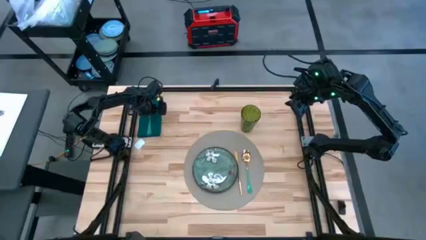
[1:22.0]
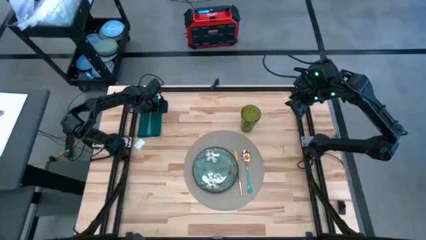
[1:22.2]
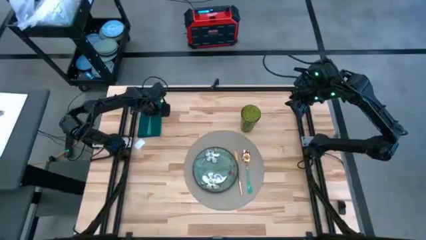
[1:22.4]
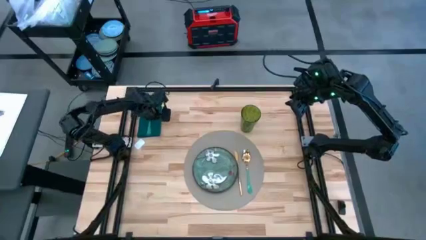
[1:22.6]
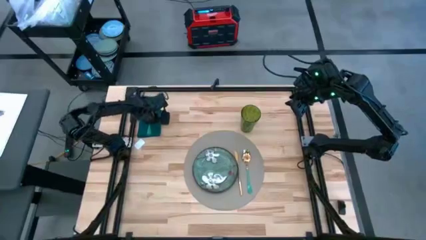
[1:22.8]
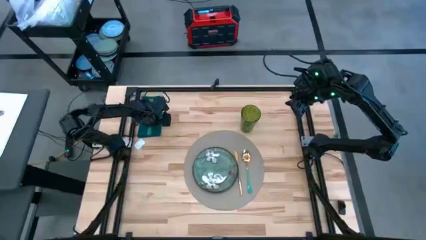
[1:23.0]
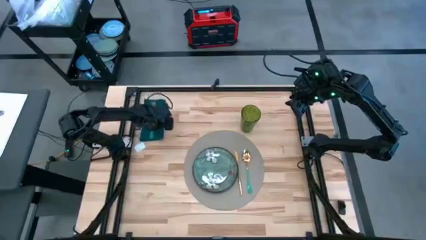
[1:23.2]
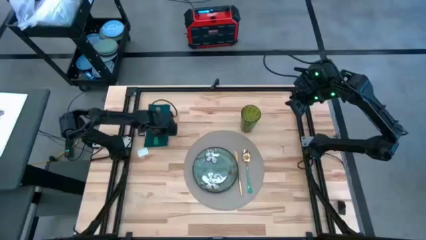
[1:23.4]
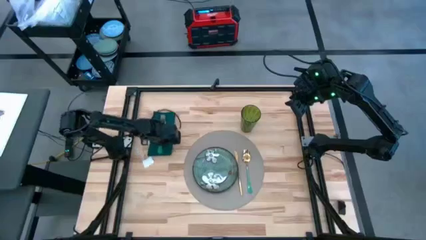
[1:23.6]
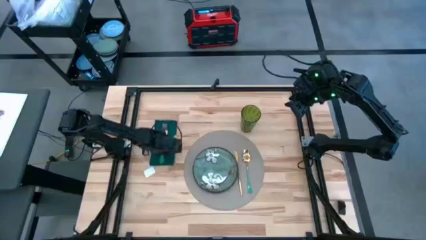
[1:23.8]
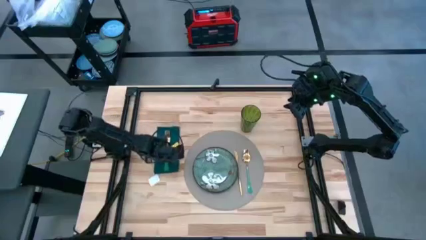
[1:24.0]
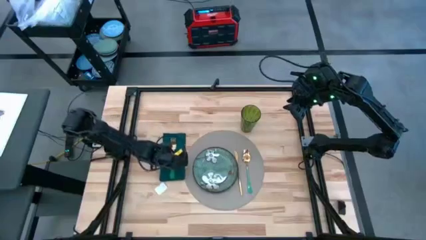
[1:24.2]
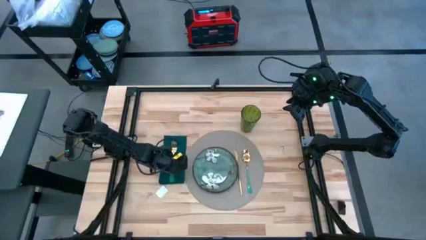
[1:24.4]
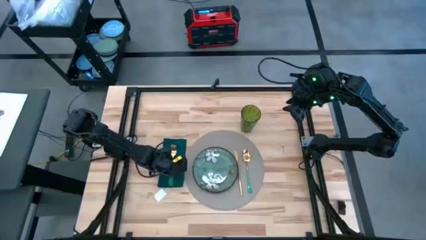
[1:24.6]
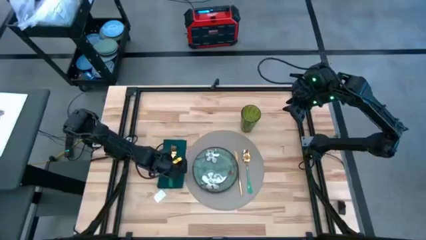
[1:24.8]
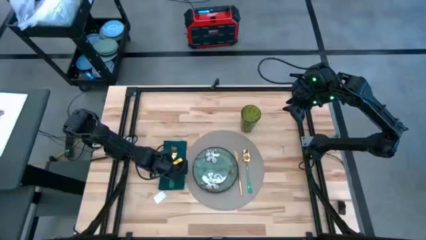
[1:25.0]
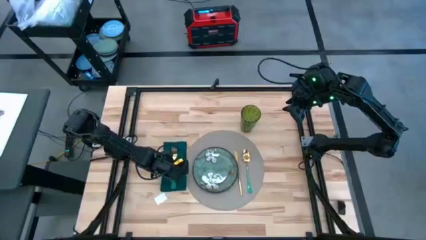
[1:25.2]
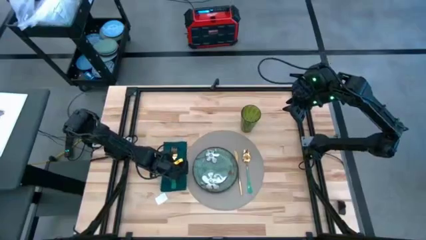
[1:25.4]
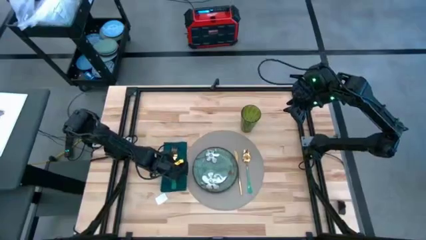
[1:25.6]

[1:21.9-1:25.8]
Task: Set table place
Move the green napkin to the left of the gray placemat

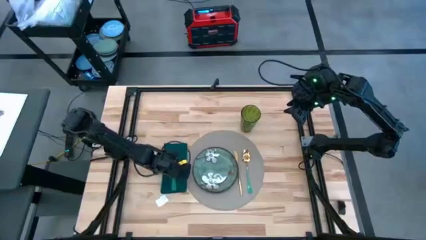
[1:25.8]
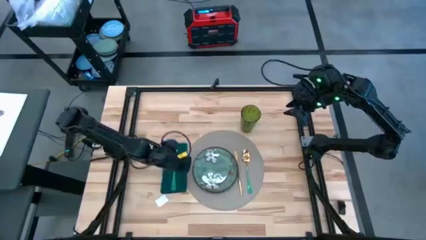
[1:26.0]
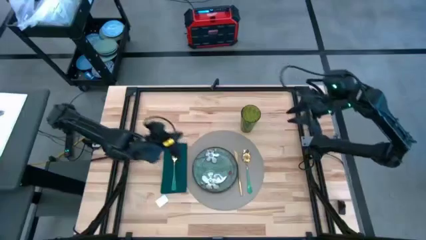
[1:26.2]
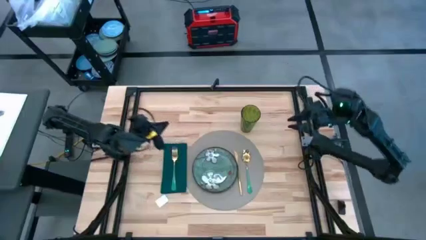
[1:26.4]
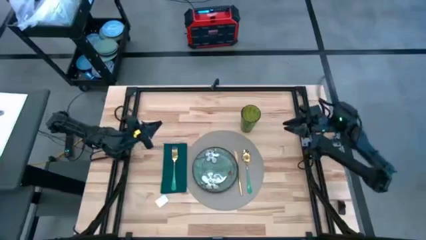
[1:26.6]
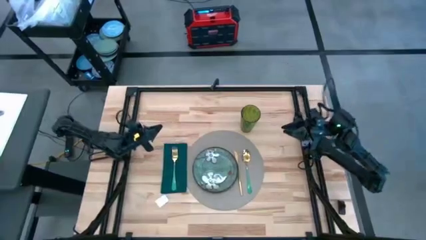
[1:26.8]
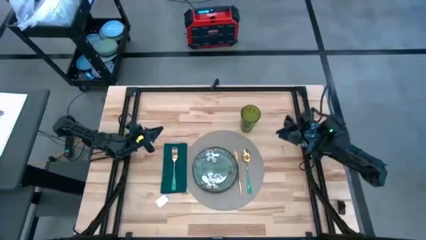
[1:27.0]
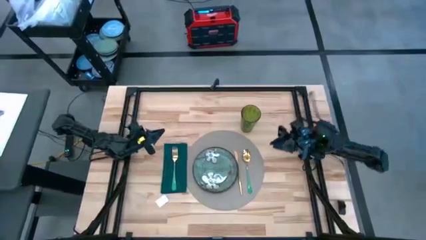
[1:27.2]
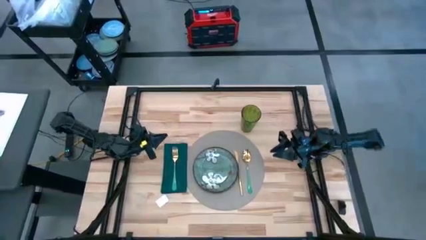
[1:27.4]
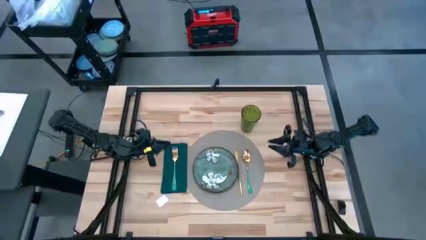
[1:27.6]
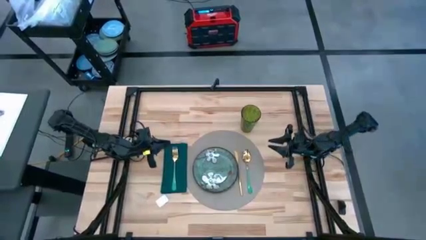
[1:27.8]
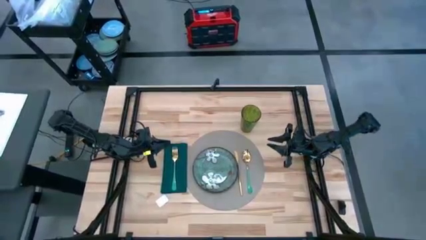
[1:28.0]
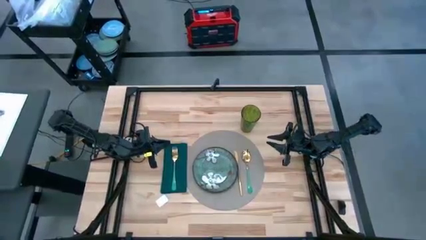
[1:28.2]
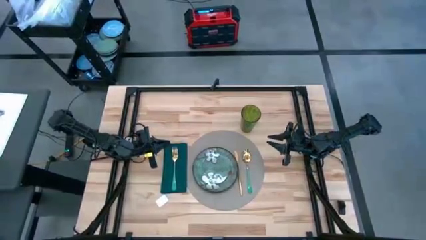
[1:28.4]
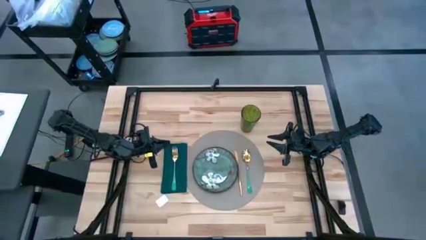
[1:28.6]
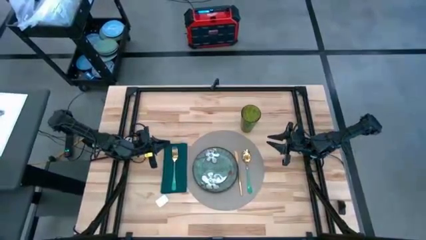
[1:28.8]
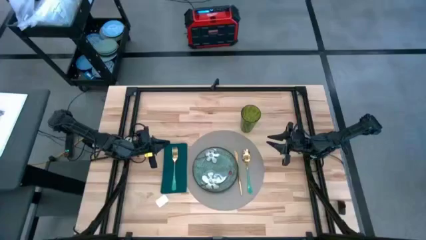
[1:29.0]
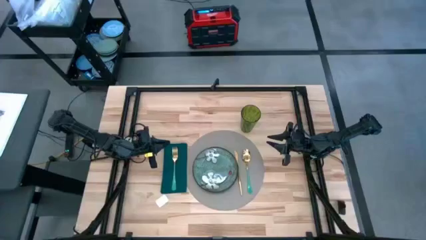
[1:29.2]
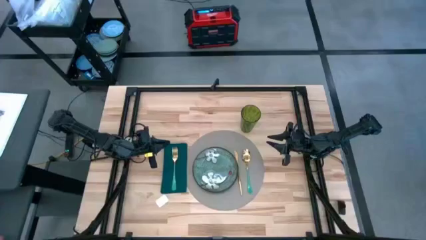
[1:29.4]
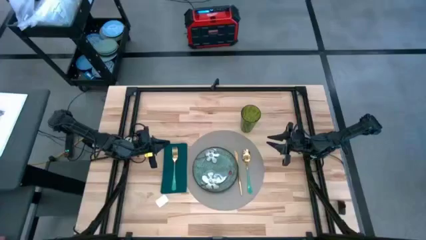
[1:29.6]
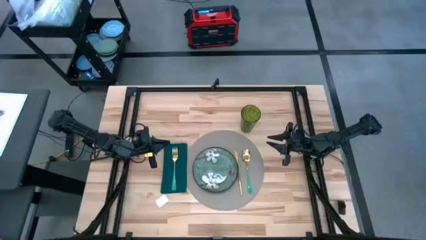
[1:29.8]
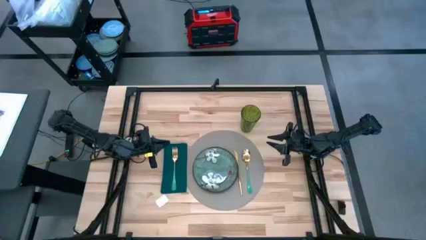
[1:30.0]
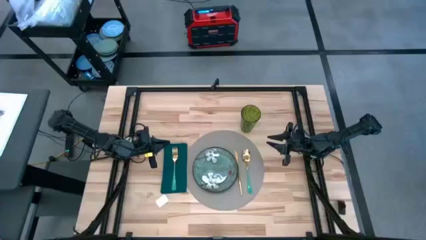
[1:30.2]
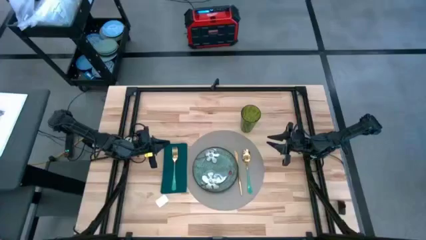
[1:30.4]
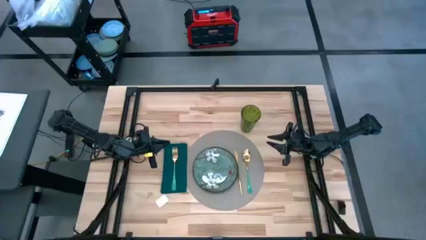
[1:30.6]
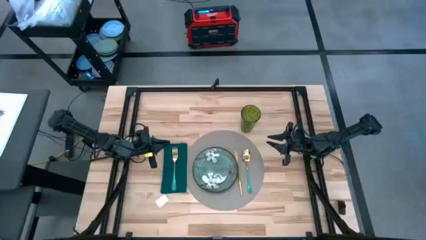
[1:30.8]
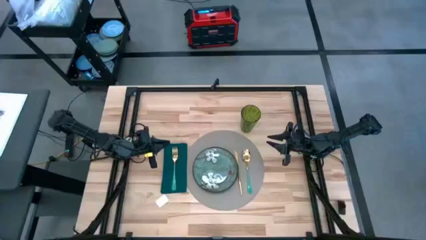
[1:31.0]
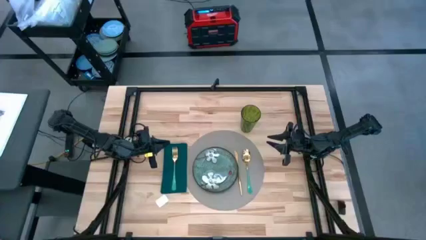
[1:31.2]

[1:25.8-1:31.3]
Return to Home Position

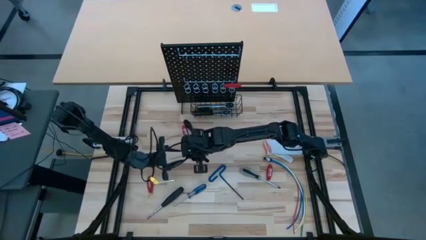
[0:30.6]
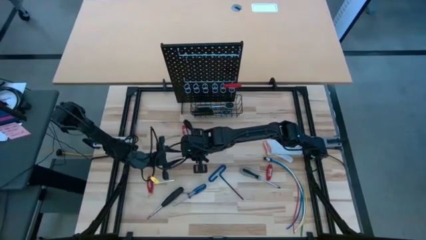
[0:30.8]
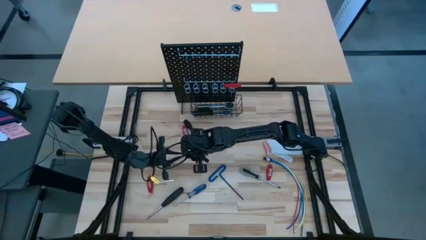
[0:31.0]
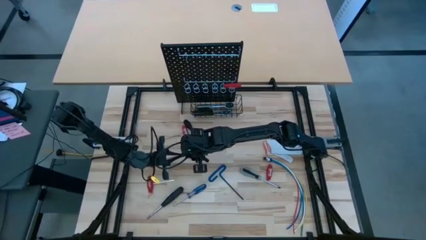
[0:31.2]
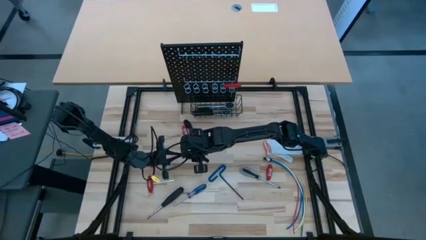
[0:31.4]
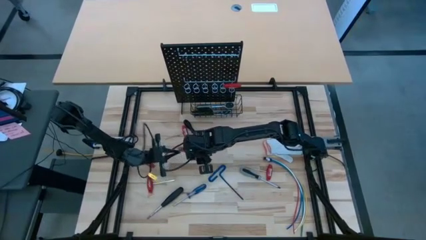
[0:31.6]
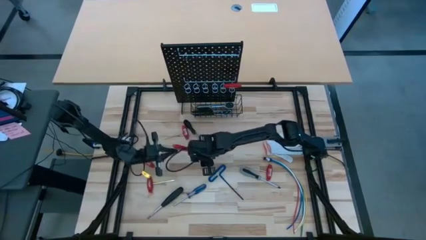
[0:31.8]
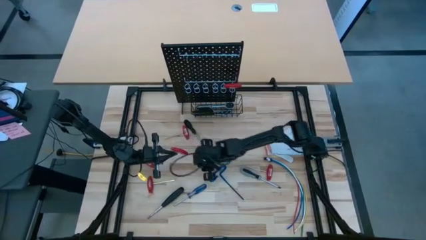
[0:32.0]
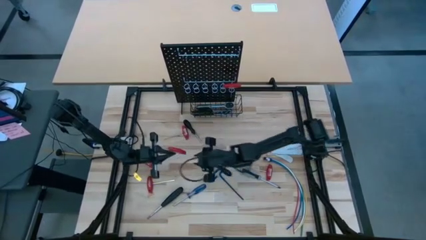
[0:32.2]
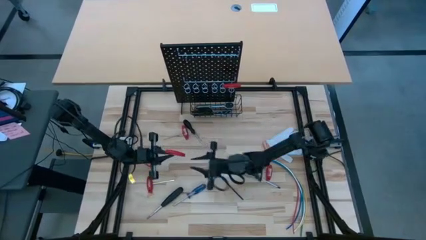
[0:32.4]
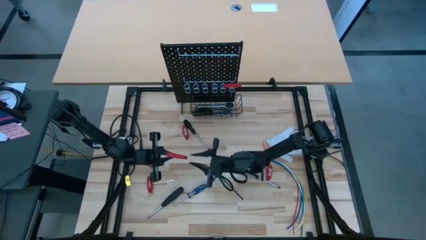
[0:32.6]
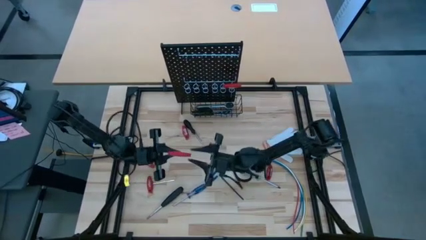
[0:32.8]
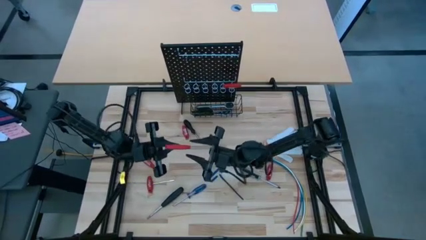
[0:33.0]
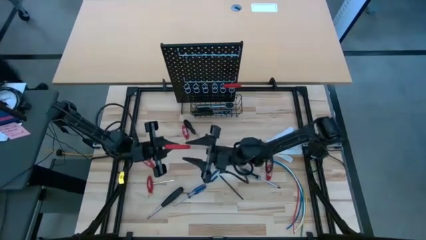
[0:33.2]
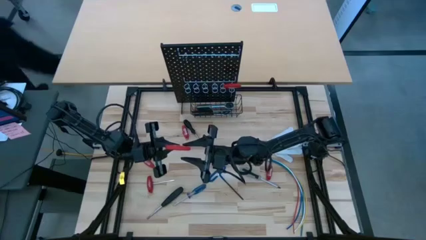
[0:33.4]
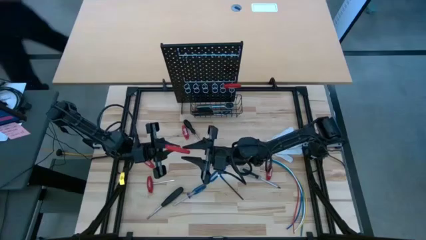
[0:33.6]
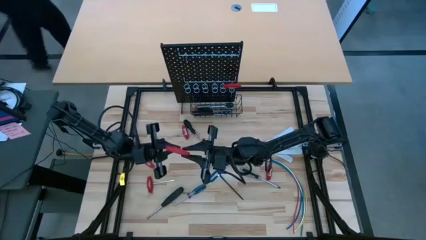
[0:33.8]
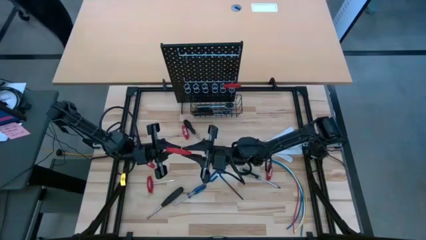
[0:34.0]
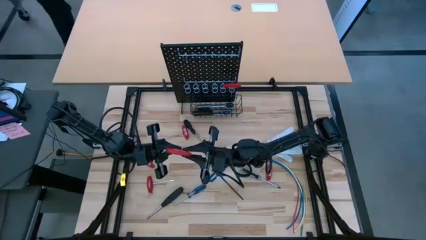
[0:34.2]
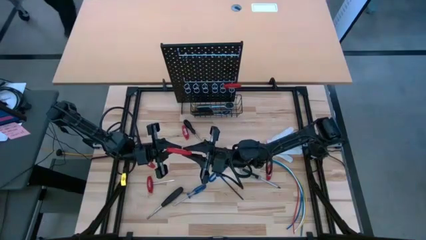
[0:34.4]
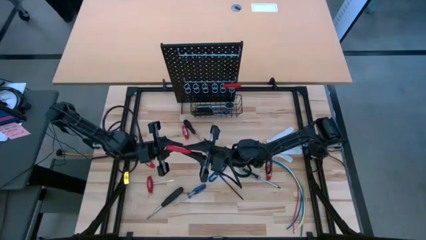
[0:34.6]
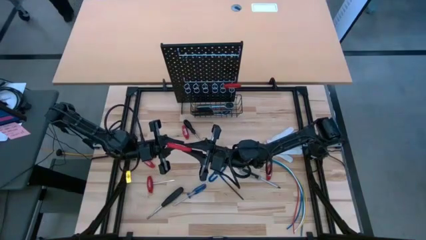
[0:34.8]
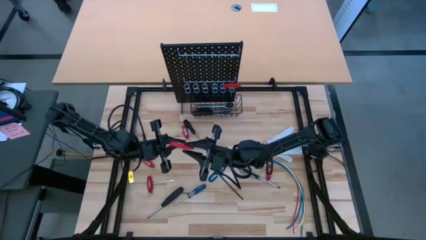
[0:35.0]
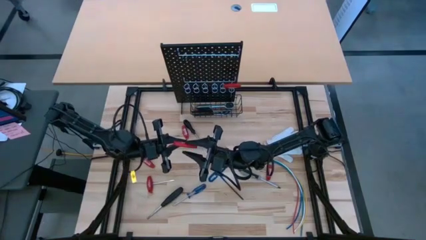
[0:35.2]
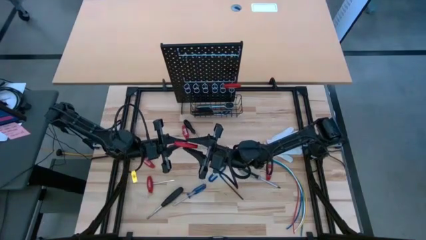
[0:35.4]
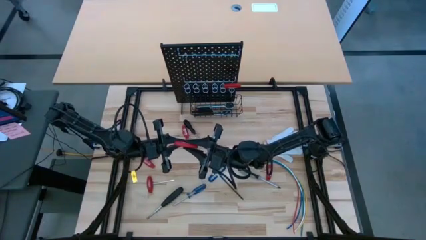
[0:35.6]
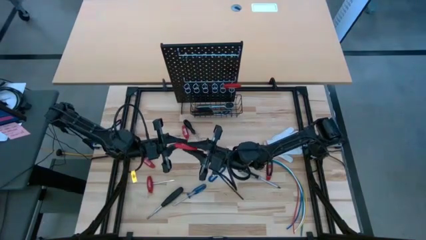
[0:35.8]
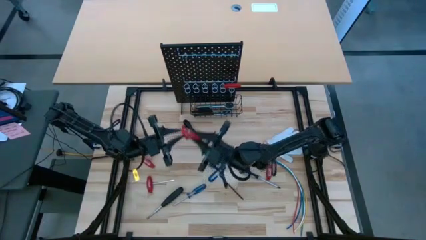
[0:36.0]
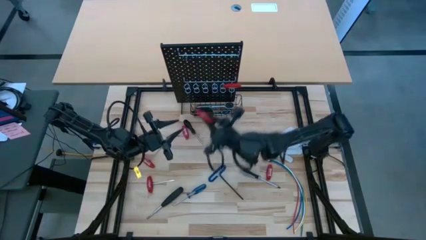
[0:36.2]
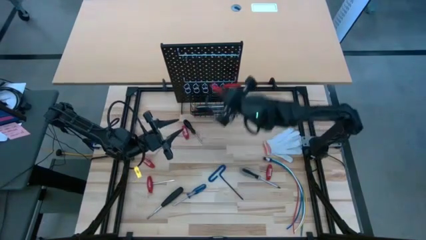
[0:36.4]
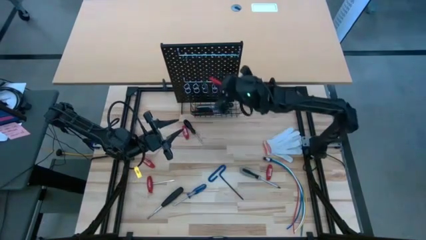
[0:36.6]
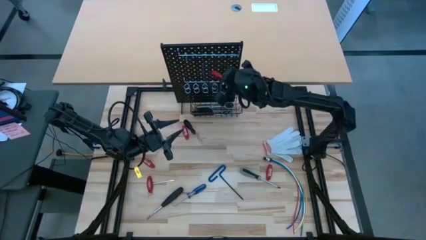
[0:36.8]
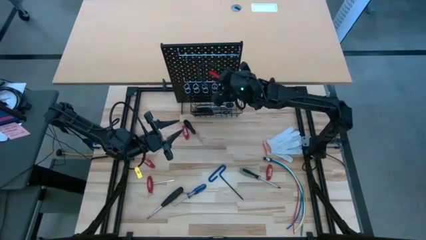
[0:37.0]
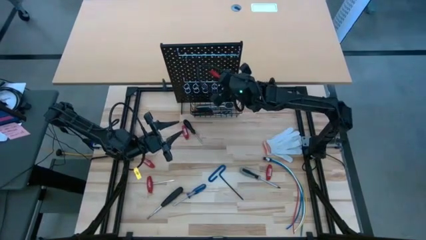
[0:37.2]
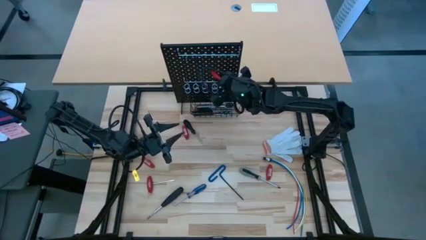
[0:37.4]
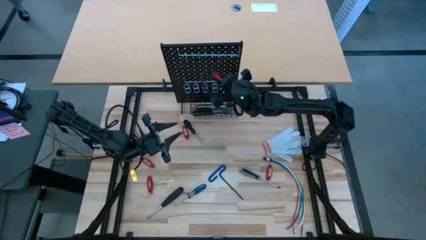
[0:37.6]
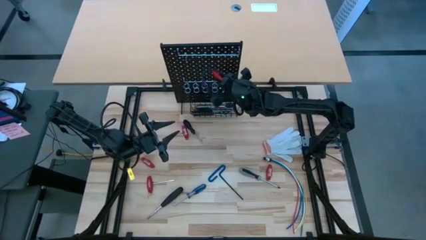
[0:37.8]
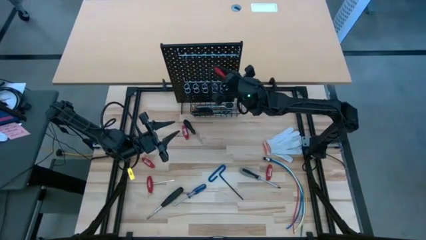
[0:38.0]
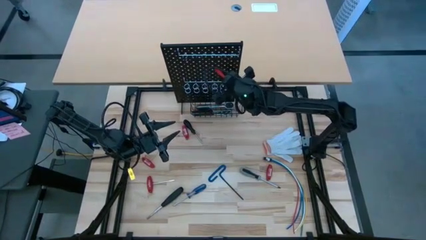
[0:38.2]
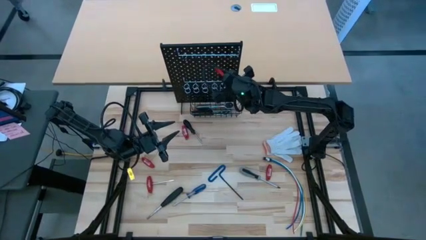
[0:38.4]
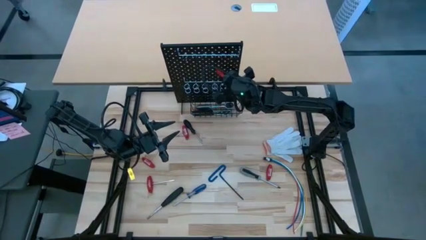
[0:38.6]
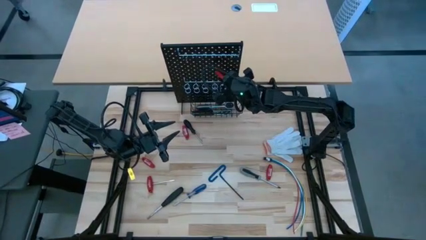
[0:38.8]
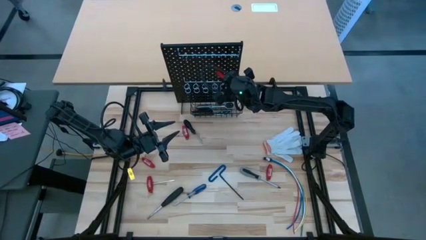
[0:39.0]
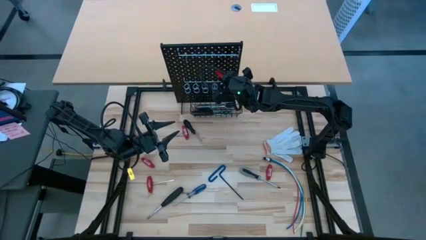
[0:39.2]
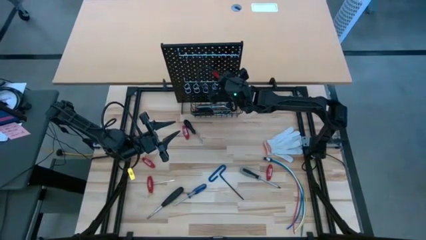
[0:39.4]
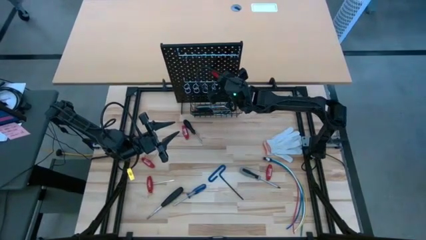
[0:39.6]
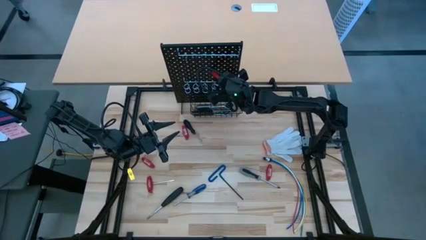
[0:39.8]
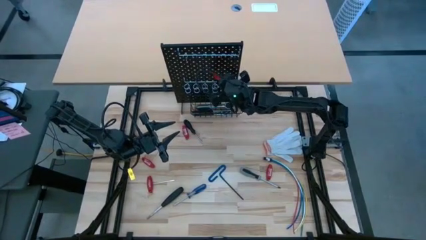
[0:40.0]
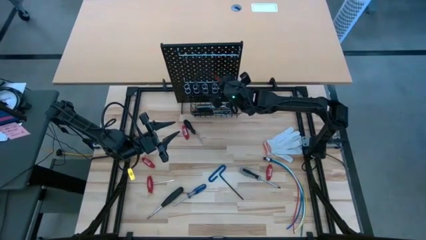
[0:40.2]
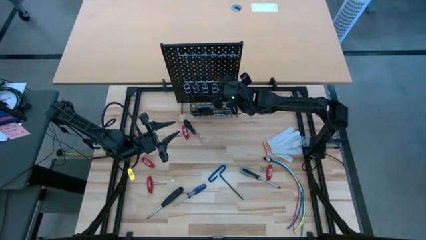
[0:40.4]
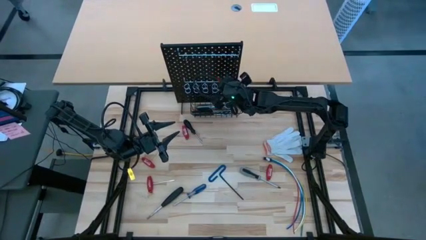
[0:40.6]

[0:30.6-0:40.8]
Task: Hang tools onto peg board
Hang the red Allen wrench on the pegboard
